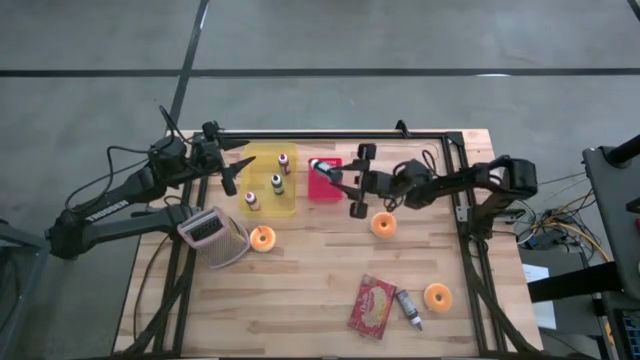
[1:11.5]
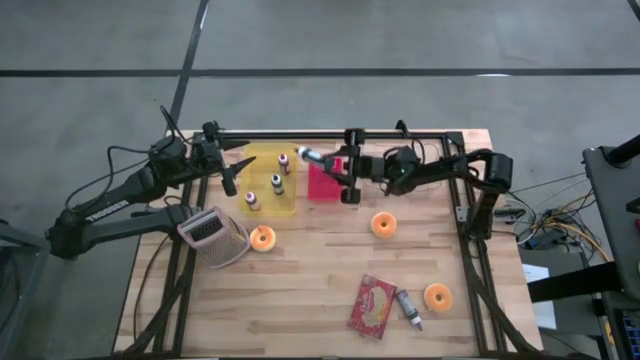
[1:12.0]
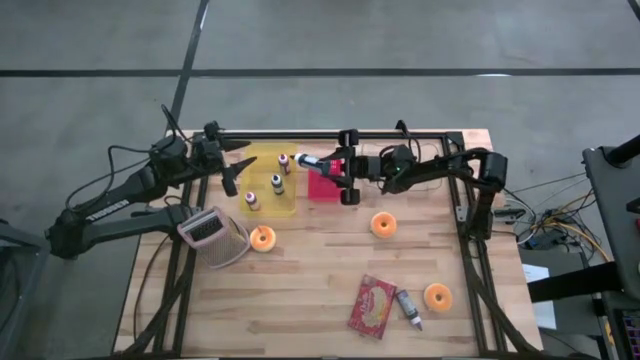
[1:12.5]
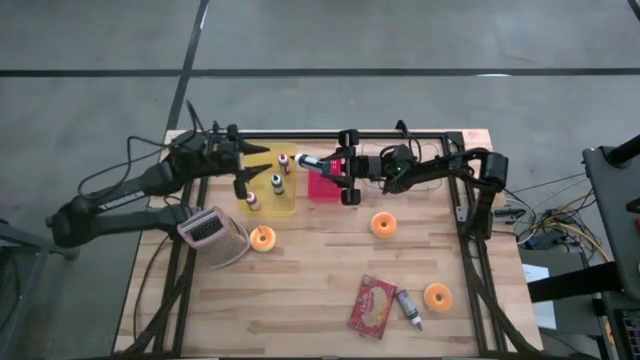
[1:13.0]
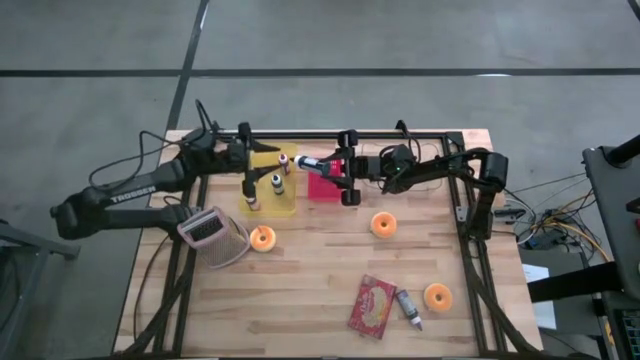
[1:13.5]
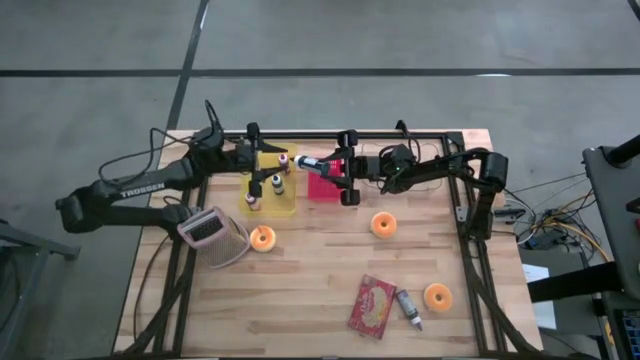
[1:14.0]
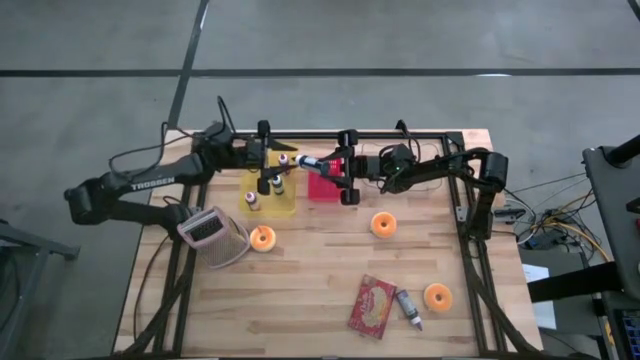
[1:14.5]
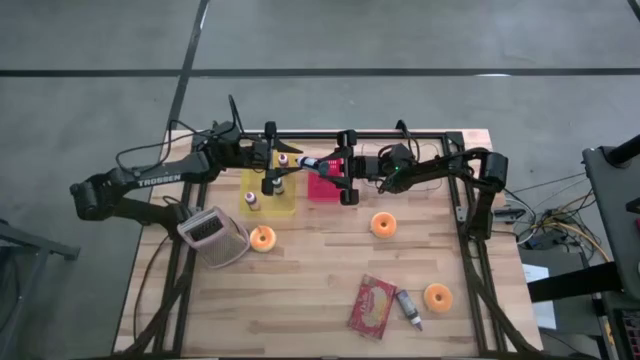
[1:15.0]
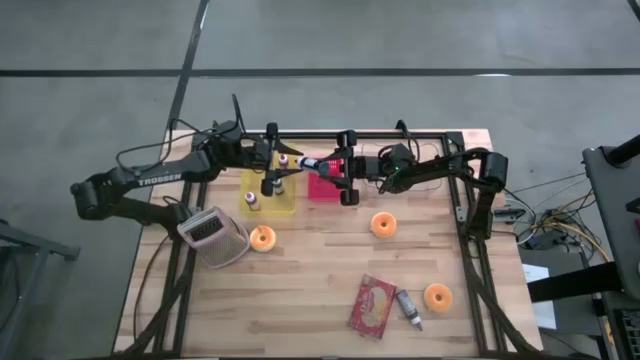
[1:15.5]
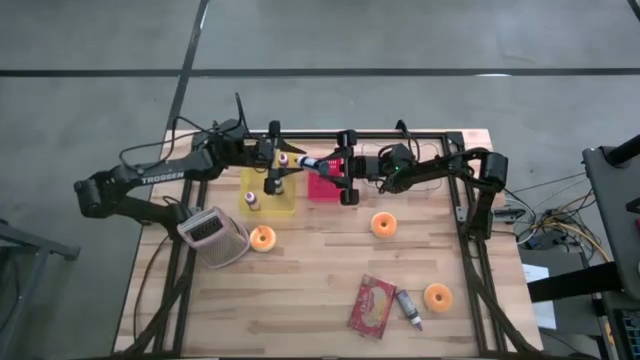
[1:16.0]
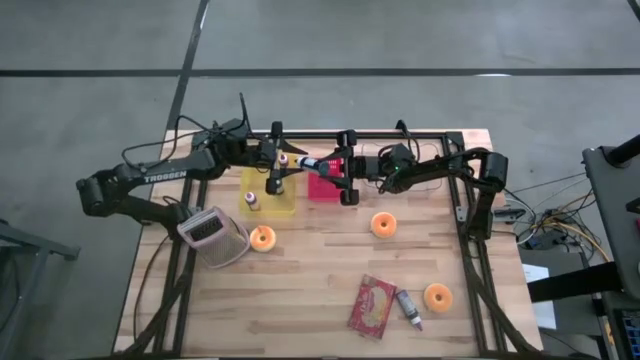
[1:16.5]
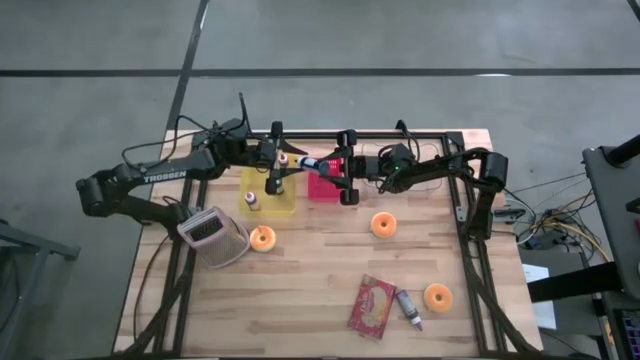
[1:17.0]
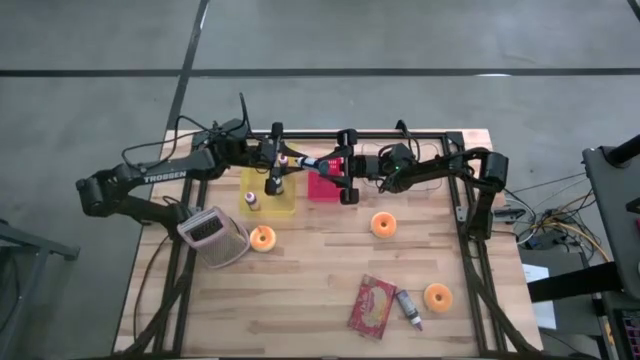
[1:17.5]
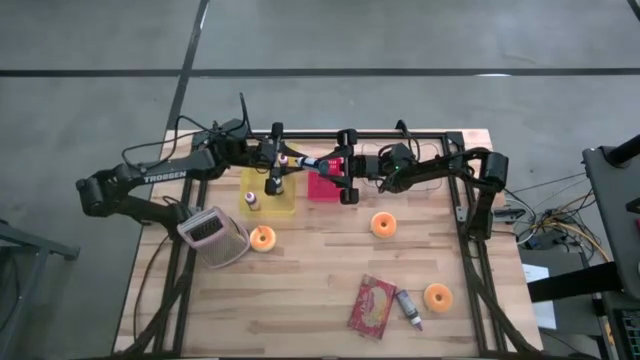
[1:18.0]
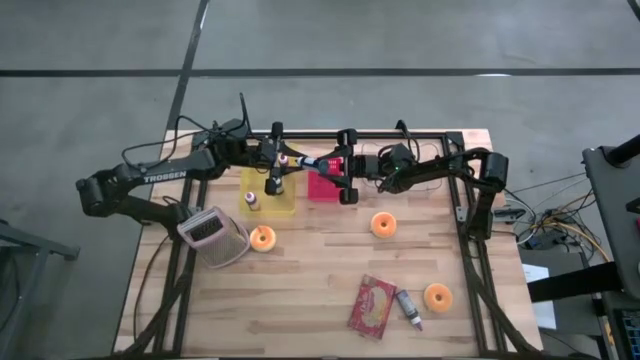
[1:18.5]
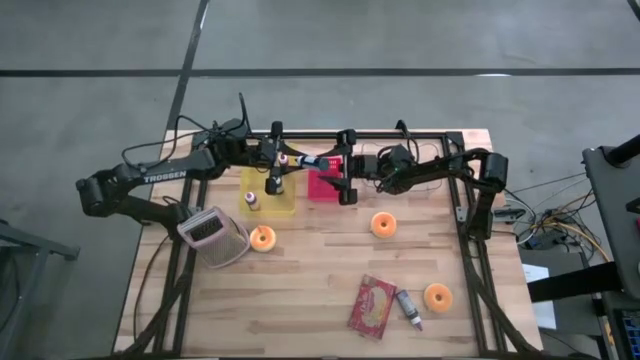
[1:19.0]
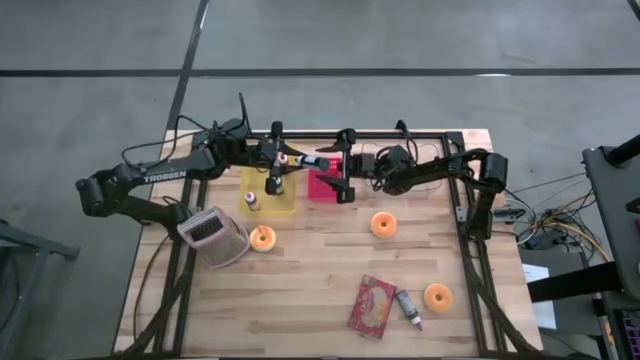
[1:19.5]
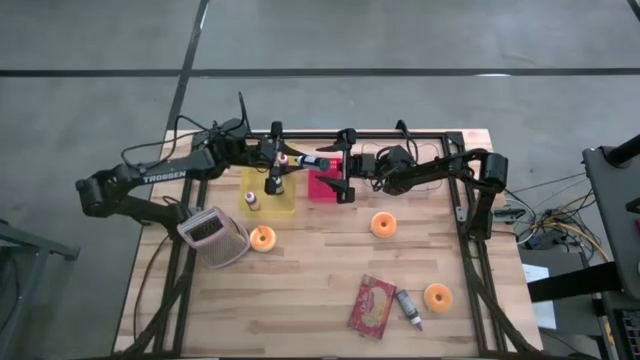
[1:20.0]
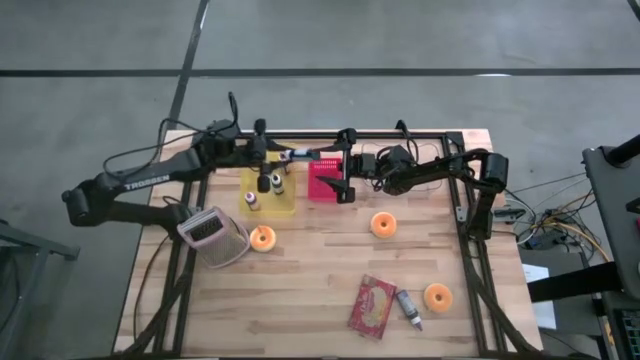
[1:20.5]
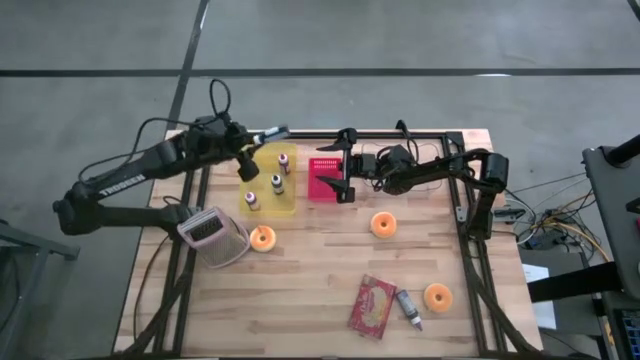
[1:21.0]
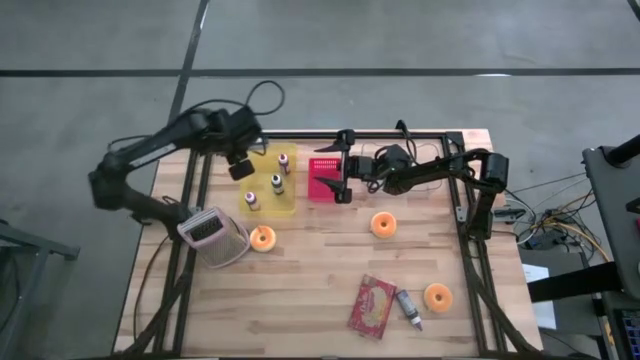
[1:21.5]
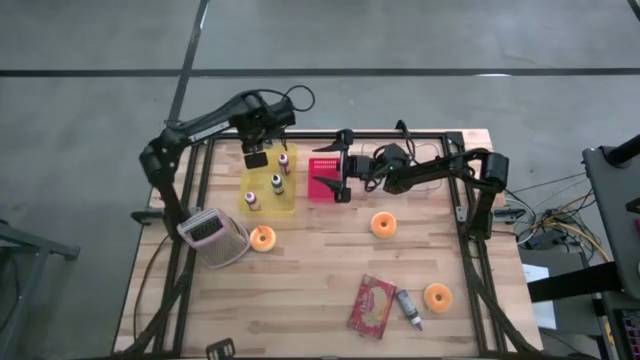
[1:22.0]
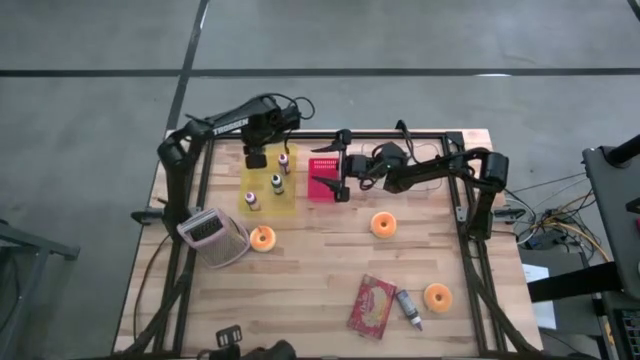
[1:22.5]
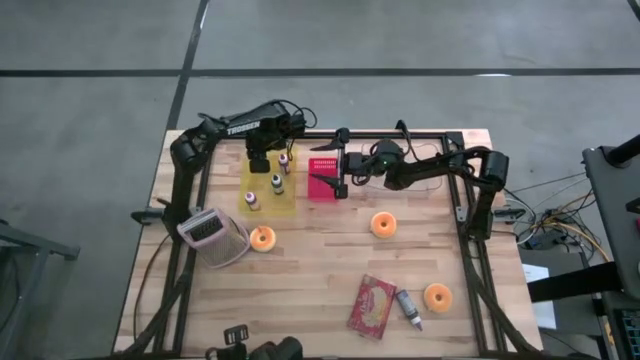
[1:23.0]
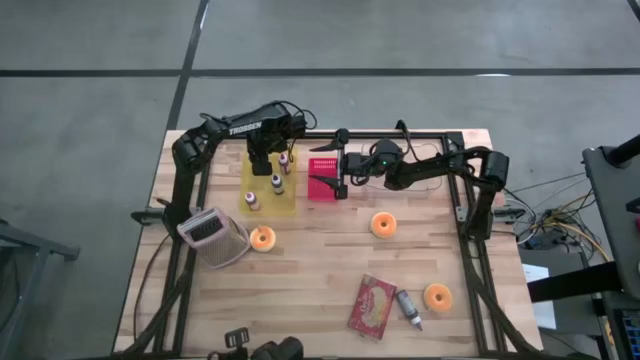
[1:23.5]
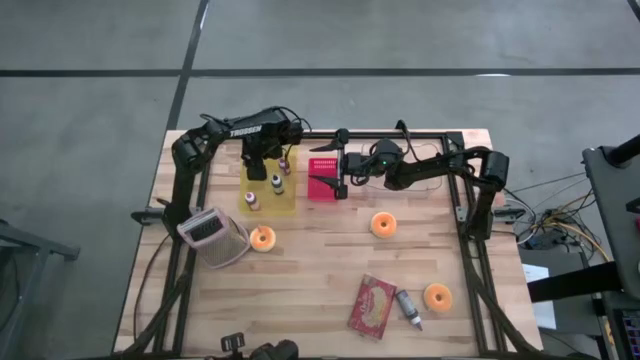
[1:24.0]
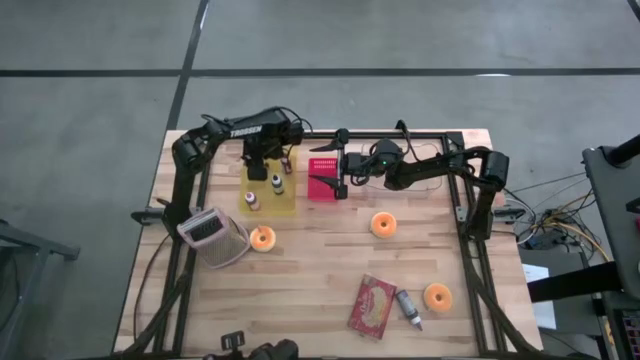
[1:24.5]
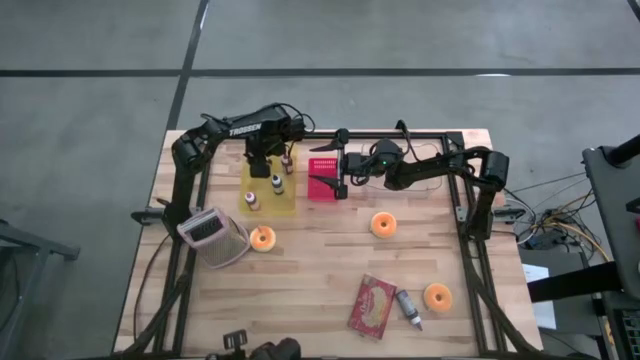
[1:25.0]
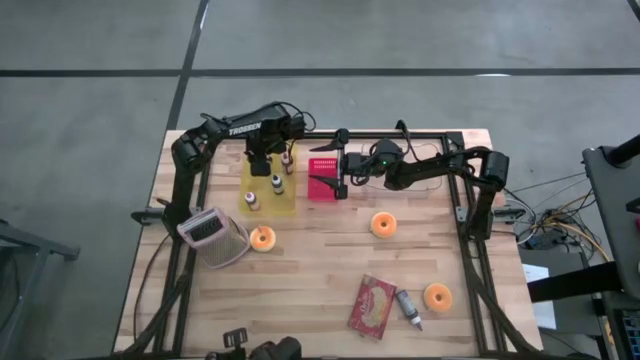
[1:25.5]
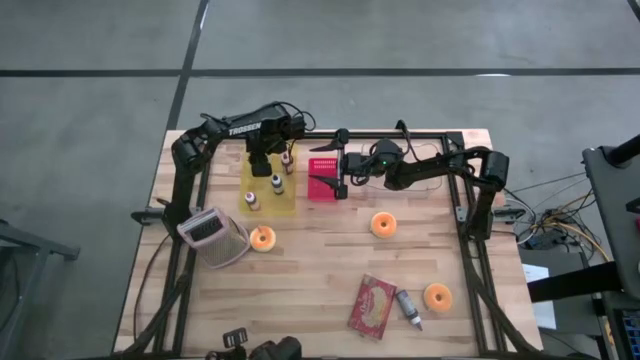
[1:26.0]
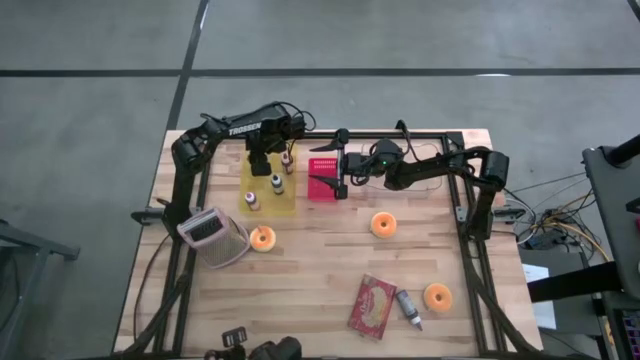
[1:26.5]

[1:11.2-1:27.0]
Task: Pick & Place Food Item
Put the black food coloring bottle into the yellow bin

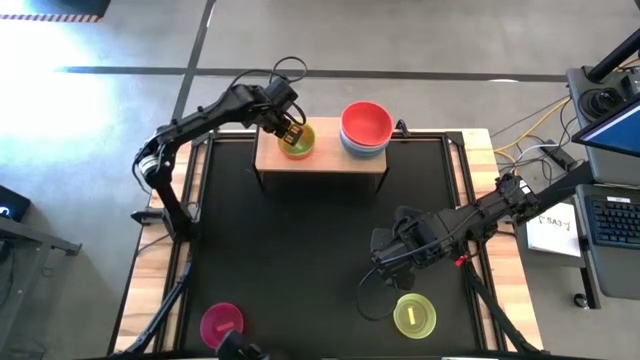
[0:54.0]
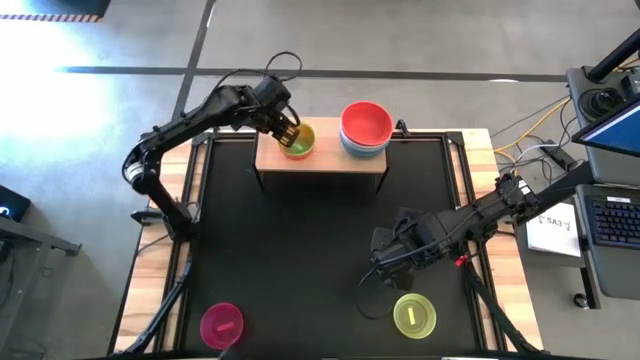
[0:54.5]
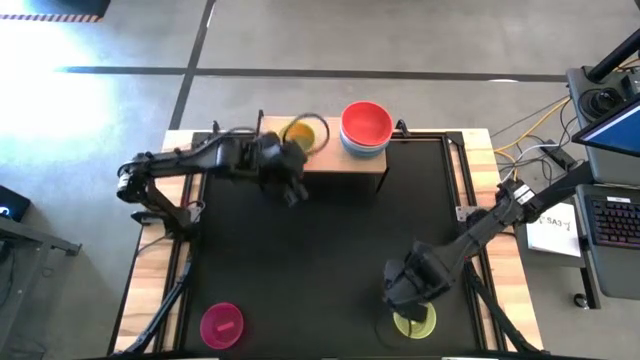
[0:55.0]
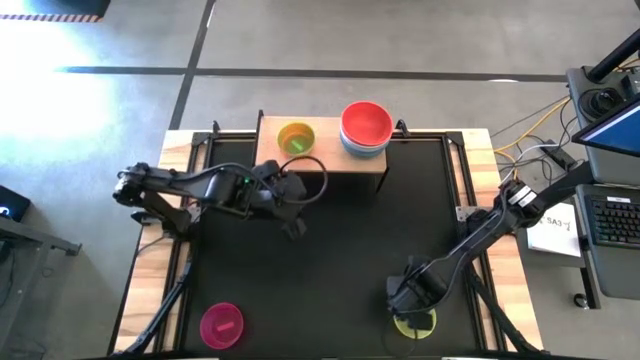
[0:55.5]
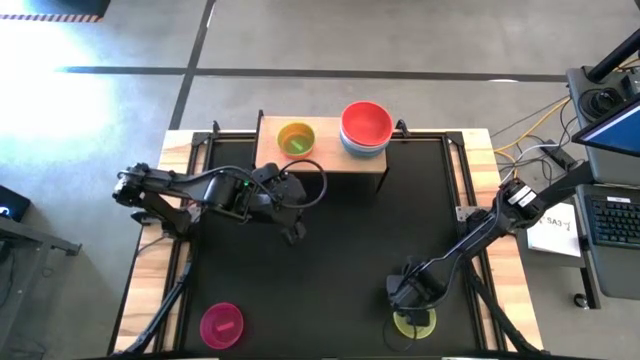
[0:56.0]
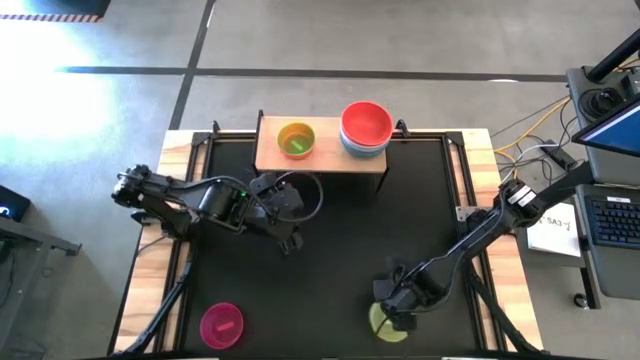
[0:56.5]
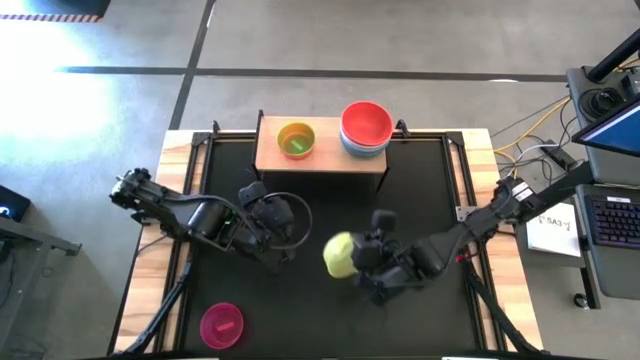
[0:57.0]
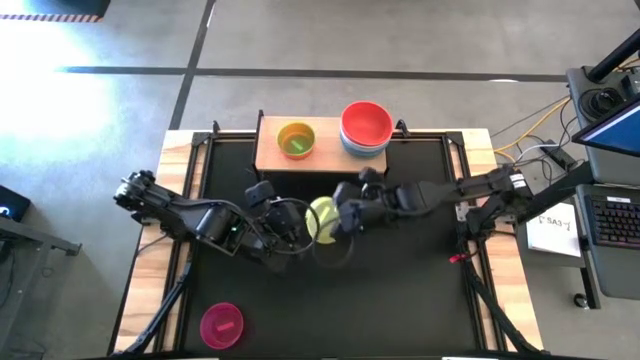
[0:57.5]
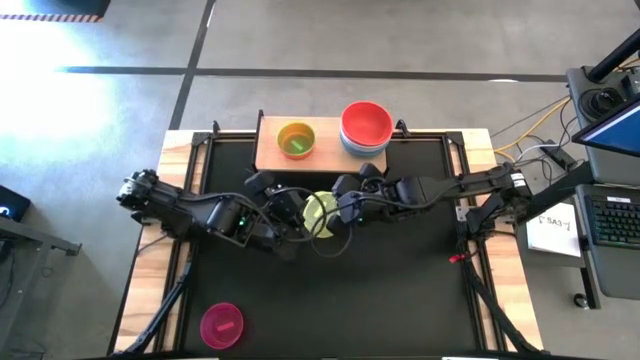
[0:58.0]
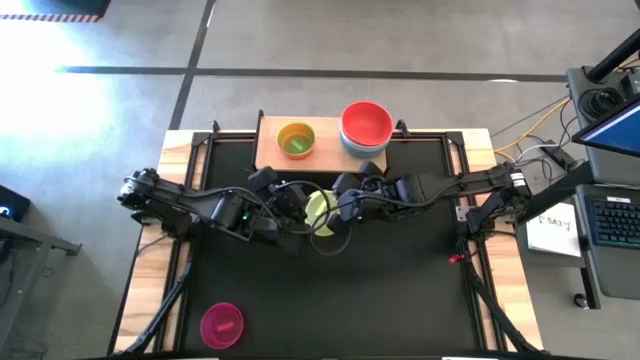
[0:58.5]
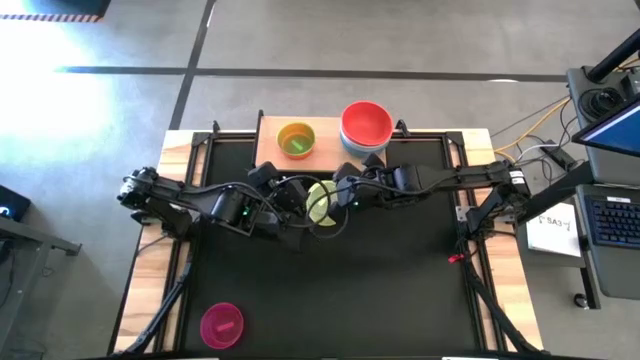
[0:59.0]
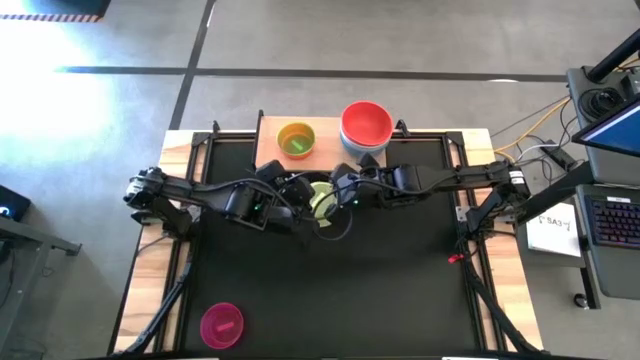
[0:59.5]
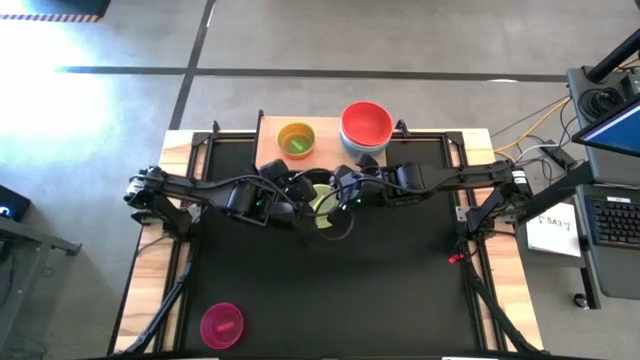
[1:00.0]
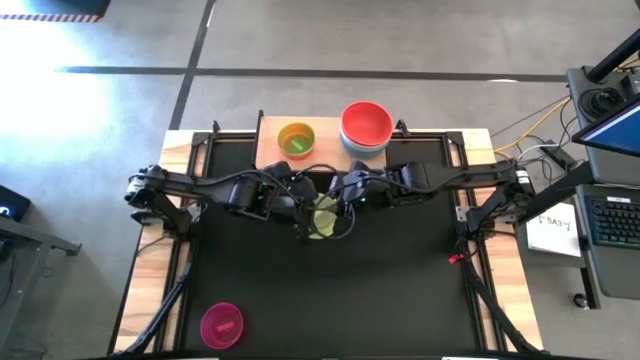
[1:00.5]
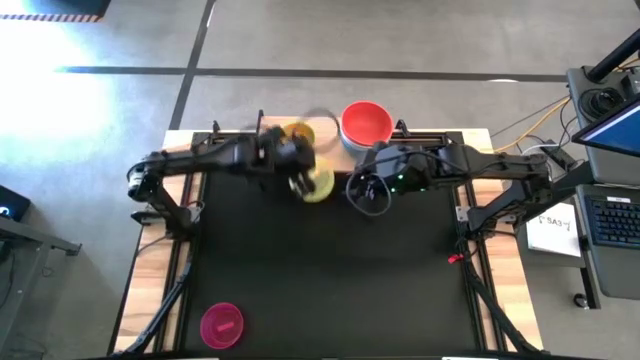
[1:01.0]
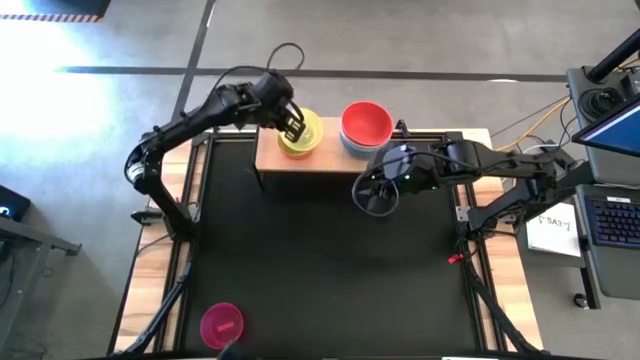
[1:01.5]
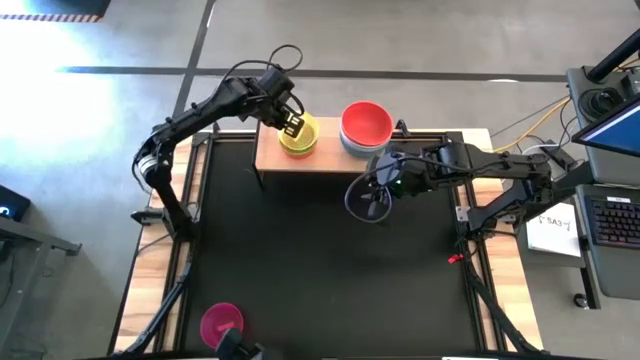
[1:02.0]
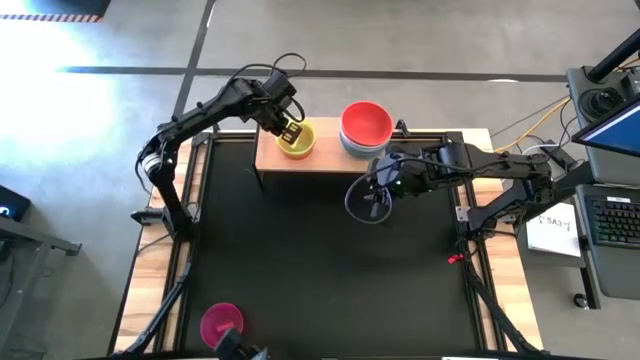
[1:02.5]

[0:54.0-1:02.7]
Task: Place and stack bowls onto a shelf
Stack the yellow bowl on top of the green bowl on the shelf
